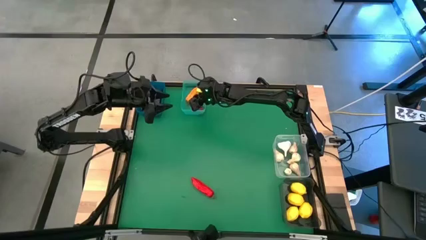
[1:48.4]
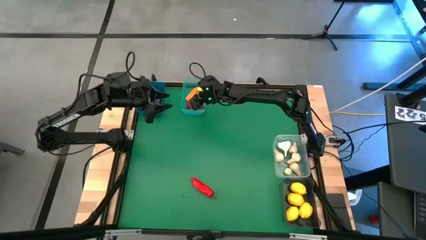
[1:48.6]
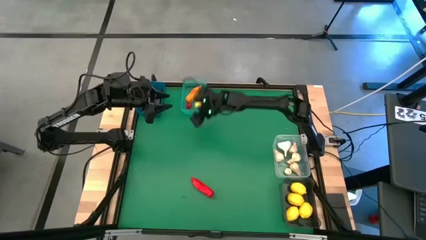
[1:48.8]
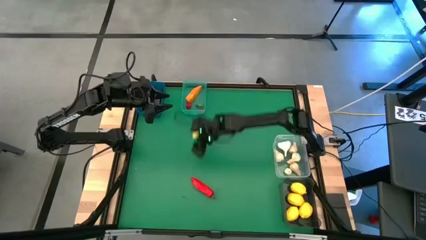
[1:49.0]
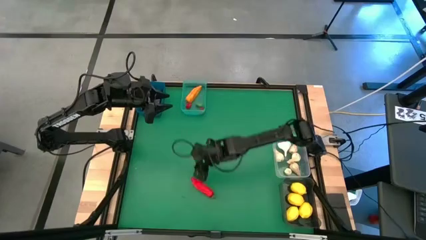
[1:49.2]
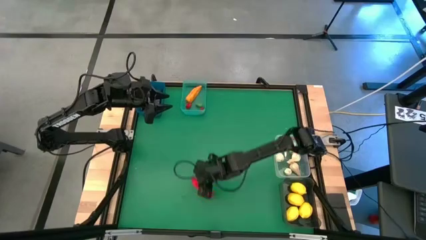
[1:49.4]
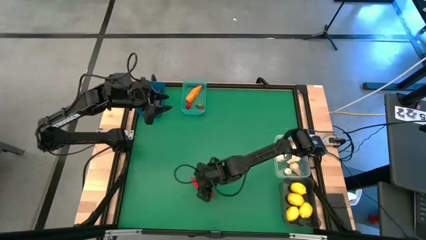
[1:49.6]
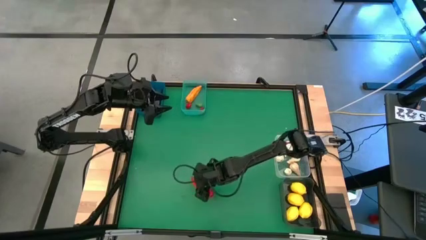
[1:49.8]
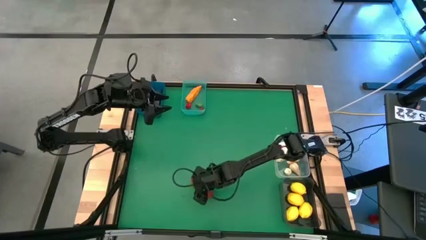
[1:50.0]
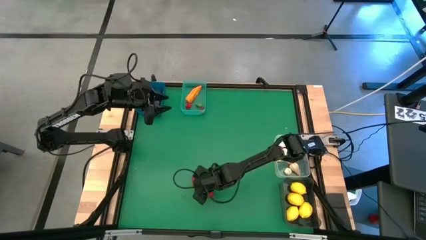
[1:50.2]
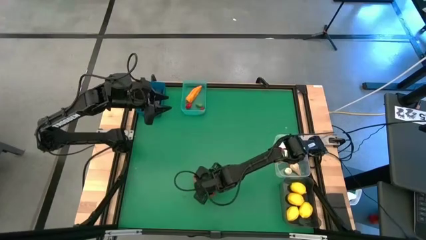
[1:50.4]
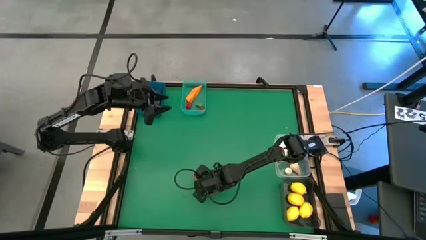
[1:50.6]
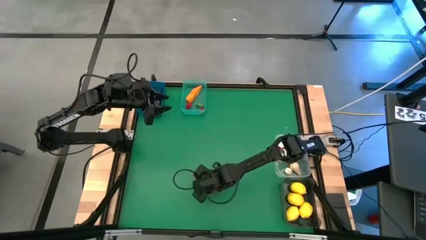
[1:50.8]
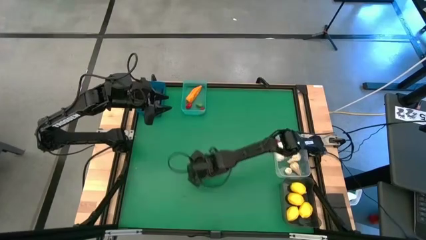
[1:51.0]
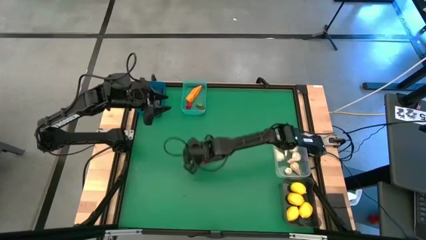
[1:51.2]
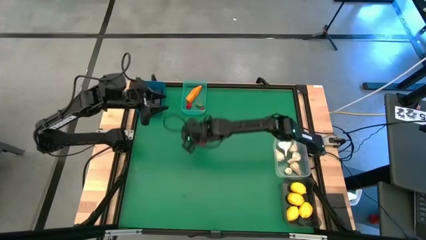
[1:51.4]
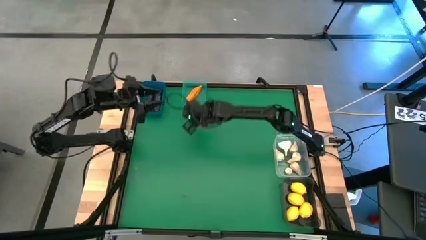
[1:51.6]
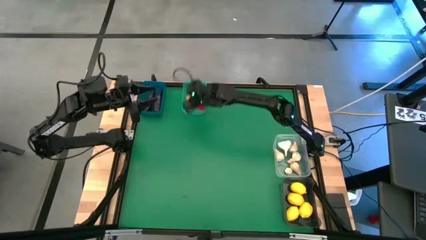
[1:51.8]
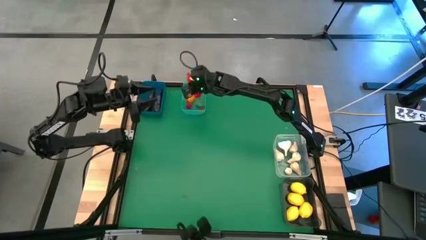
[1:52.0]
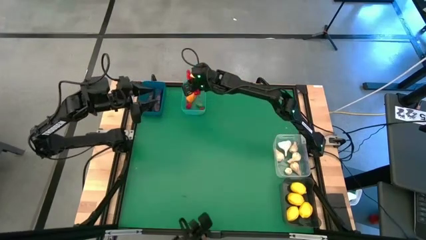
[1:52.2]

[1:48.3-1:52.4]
Task: Sort produce into baskets
Put the red pepper into the green bin

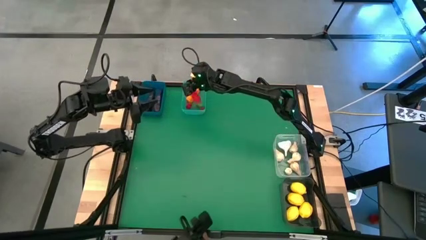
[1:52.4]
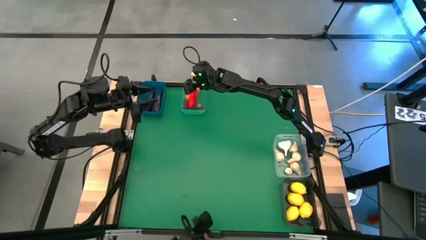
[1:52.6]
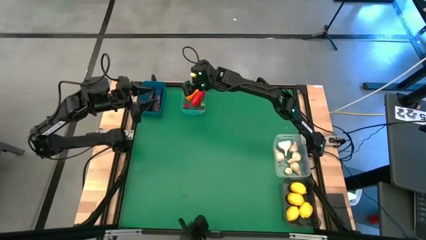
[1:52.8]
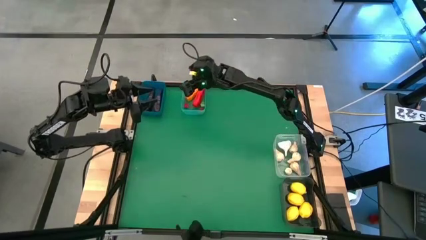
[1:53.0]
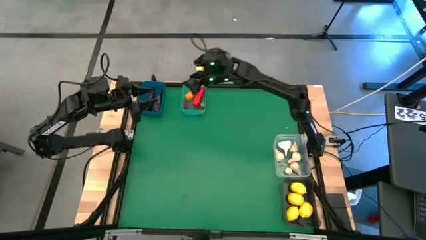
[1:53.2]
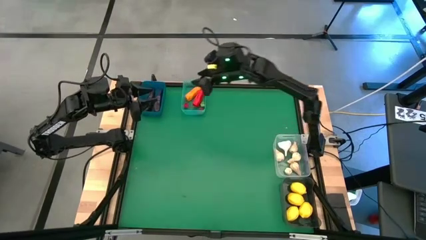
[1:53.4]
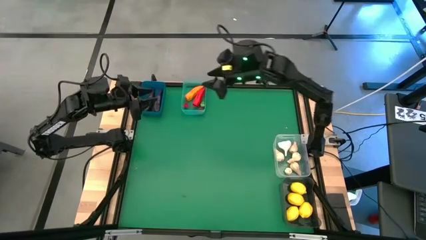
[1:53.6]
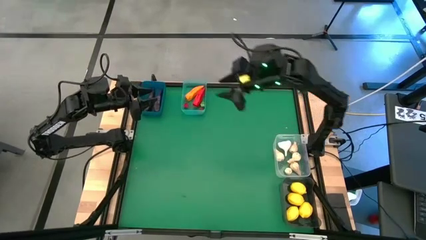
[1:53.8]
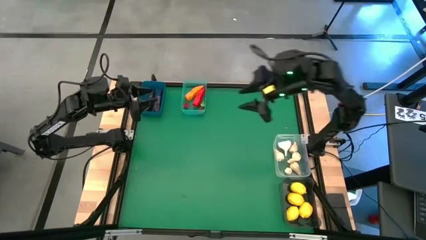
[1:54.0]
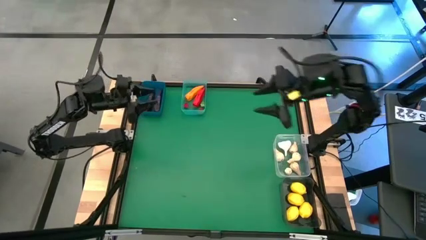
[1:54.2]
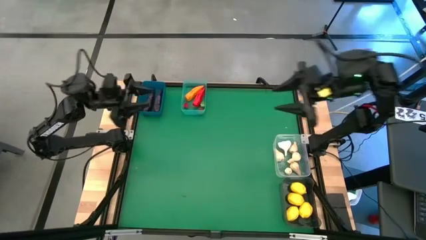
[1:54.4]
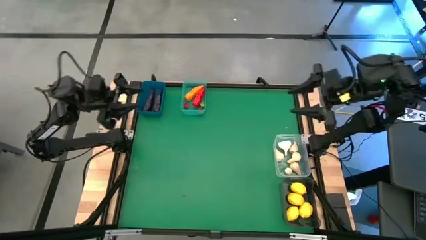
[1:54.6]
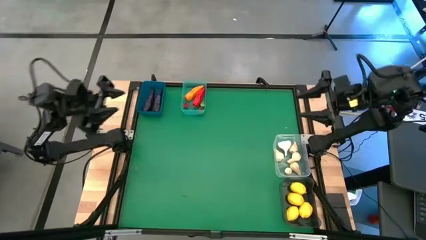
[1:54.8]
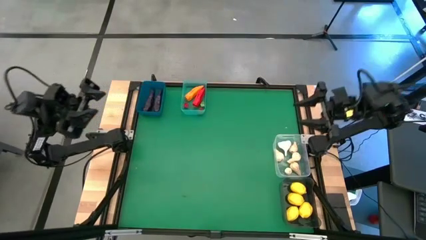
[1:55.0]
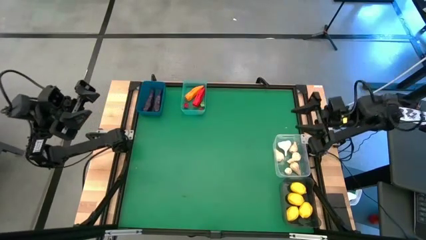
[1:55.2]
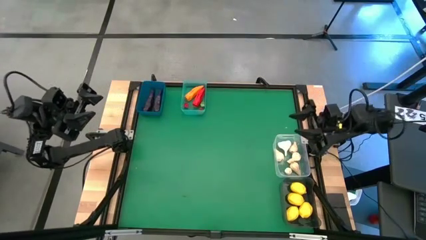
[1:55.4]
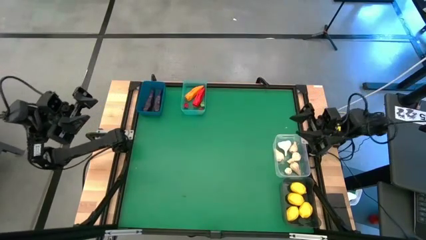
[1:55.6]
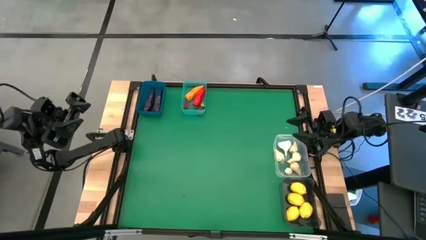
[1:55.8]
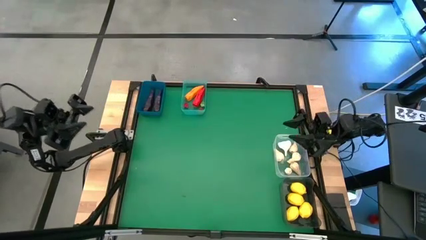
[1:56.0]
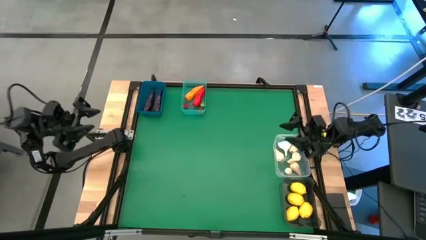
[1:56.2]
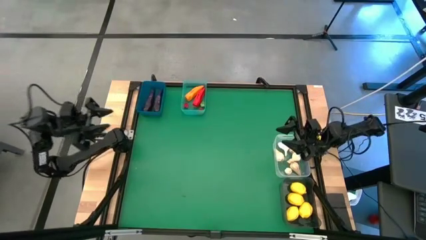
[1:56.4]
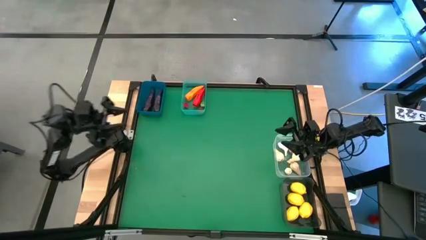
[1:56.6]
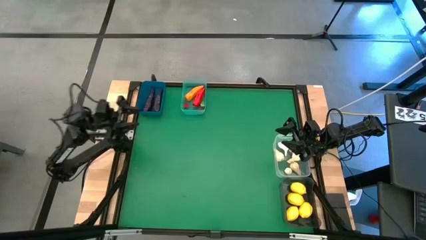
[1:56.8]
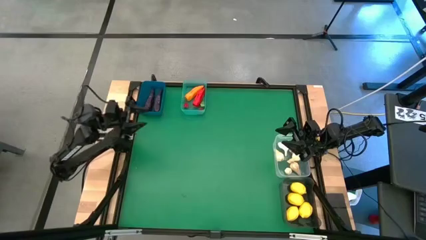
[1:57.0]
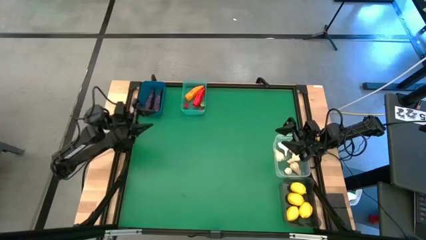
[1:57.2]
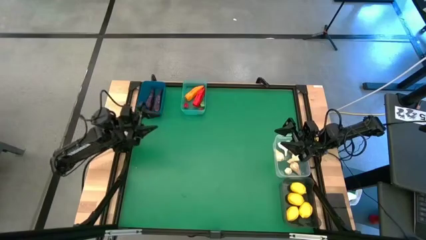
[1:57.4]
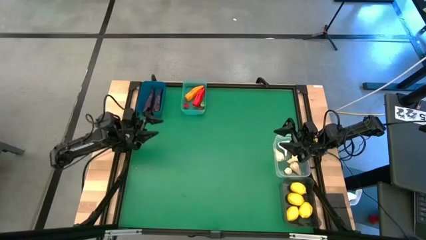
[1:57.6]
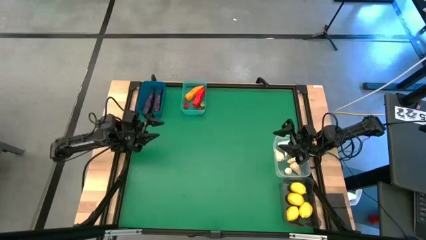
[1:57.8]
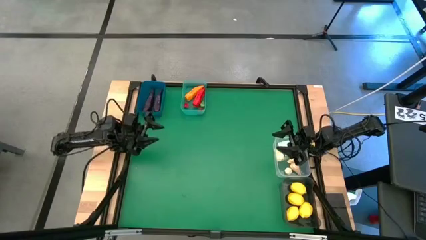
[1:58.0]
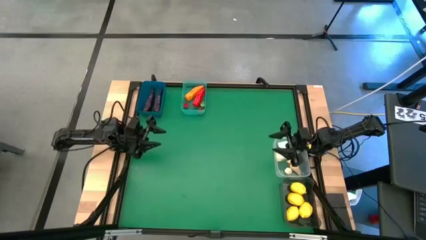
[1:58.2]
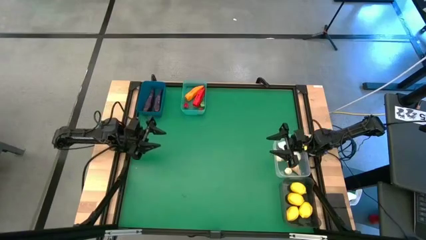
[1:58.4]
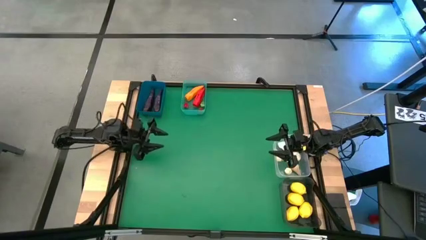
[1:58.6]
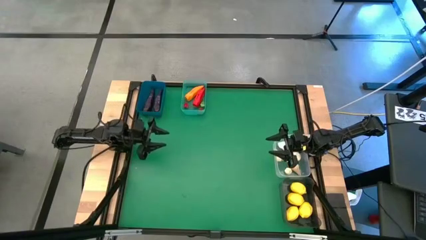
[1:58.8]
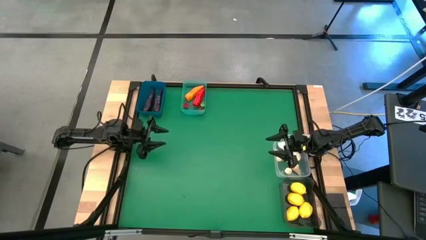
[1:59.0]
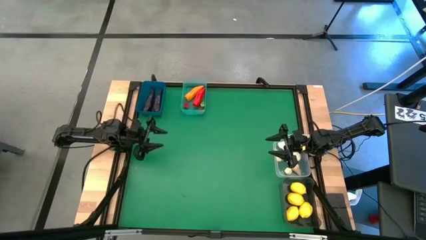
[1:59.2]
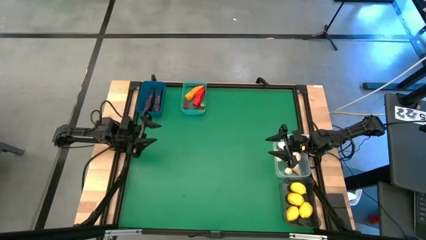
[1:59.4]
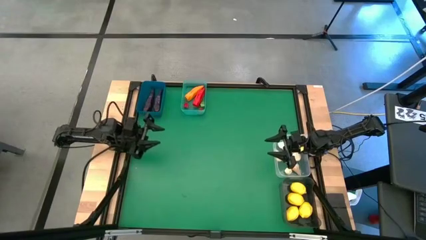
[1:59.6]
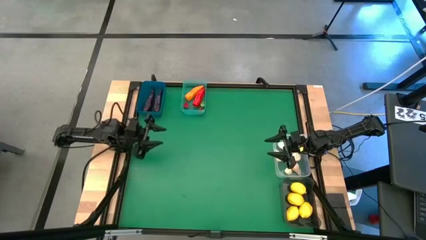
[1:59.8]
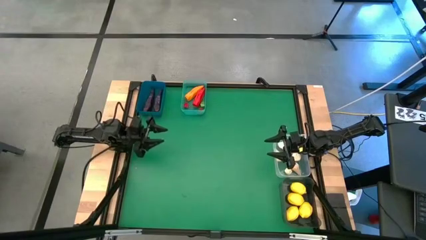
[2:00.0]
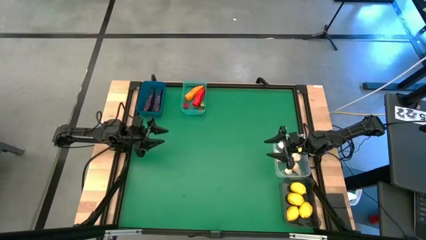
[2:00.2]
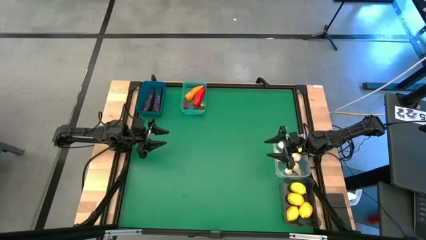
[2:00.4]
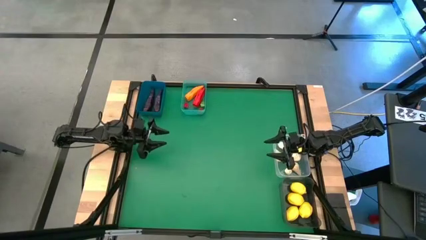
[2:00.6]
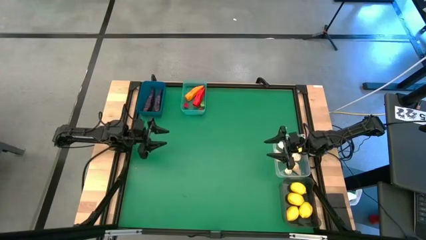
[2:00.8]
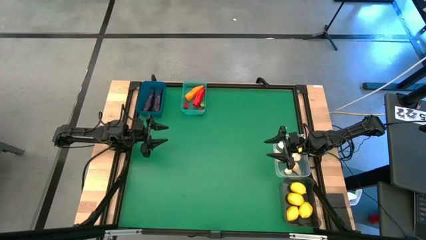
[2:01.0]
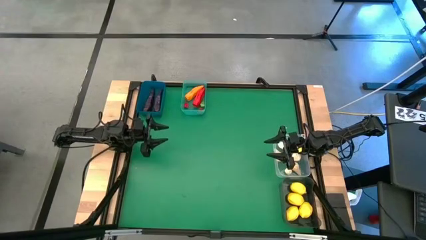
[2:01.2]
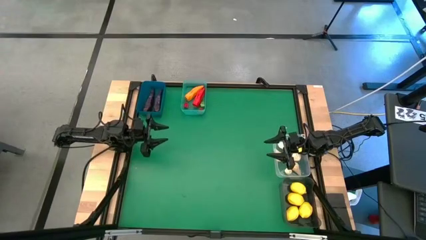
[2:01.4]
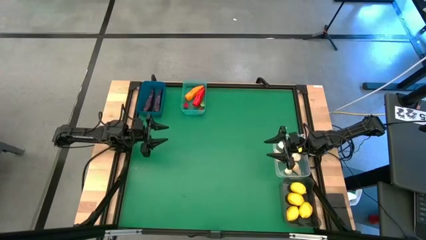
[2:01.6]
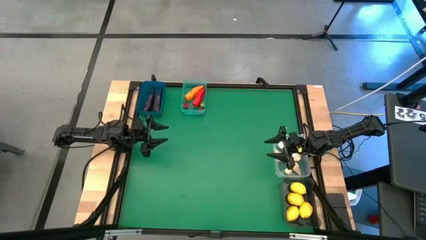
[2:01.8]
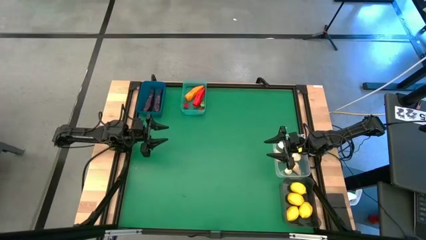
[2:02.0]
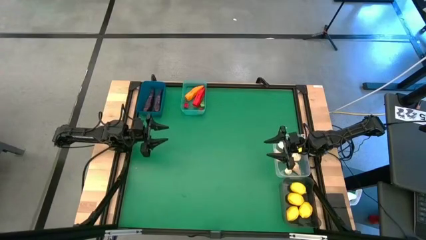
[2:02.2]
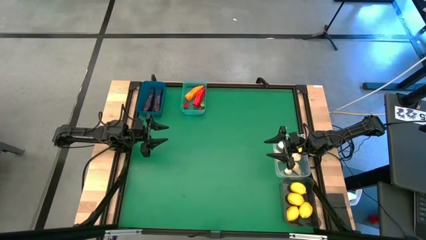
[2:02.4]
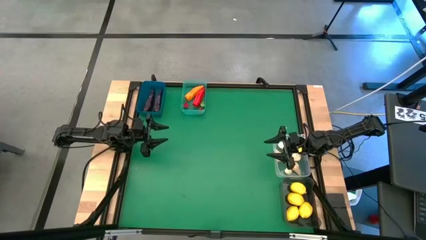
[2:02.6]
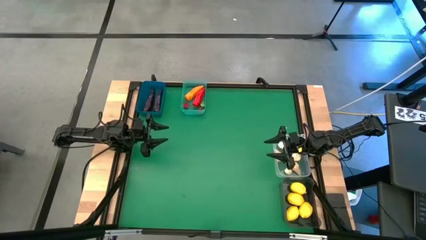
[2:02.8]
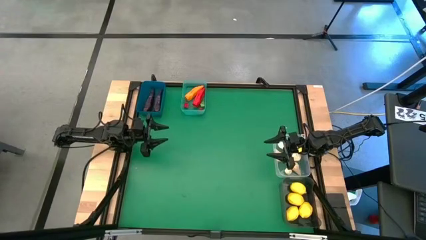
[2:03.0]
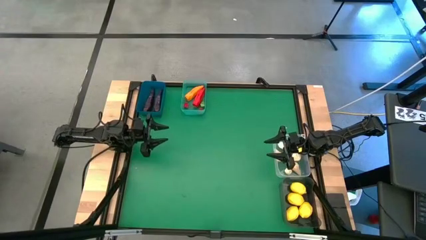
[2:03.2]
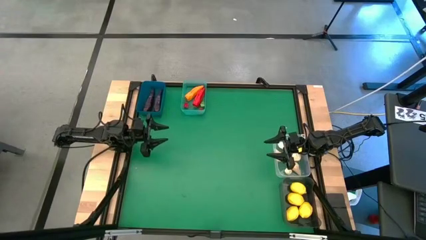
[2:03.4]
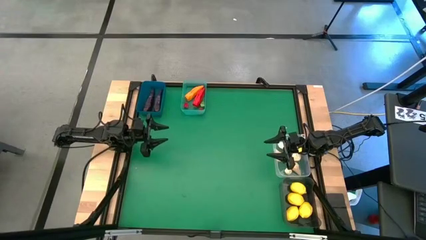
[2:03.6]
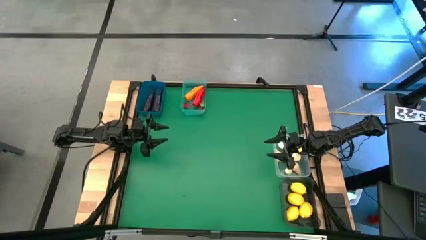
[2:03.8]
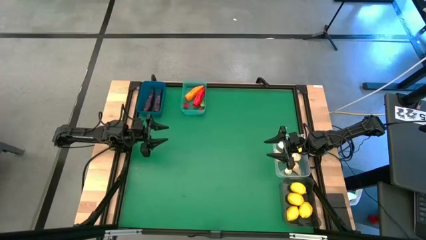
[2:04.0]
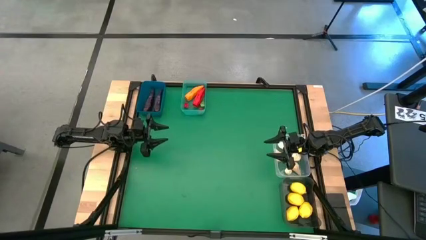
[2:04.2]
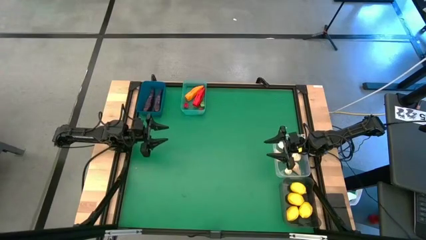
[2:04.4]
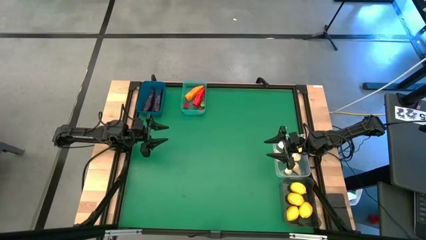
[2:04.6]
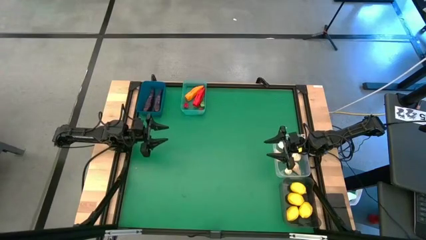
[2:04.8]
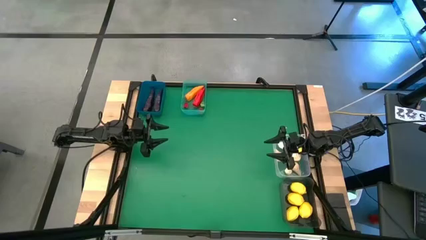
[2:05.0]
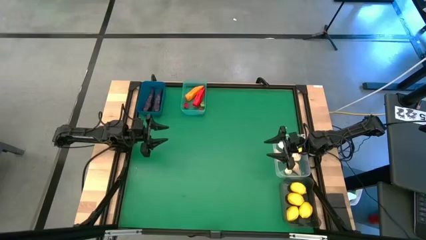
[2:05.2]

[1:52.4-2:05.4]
Return to Home Position
